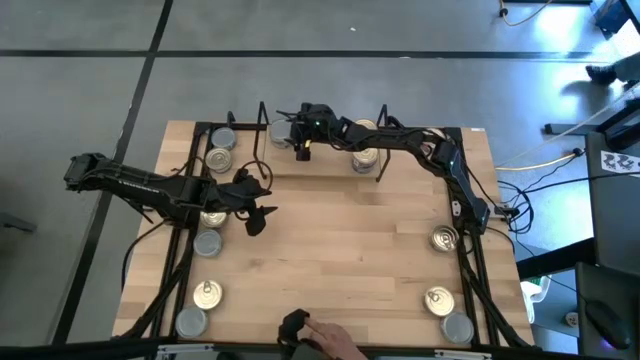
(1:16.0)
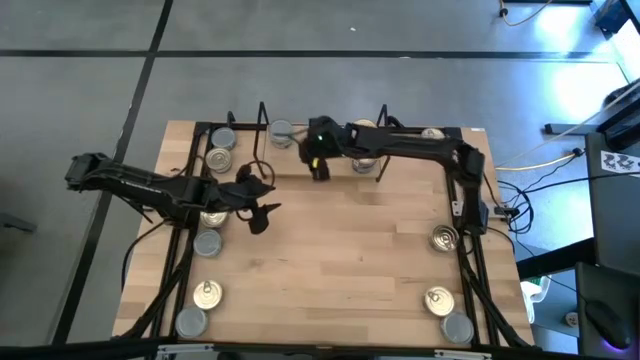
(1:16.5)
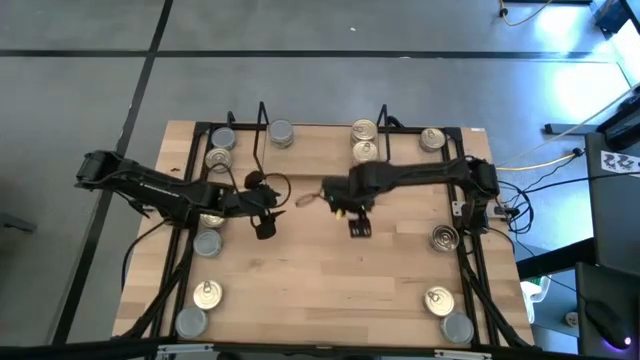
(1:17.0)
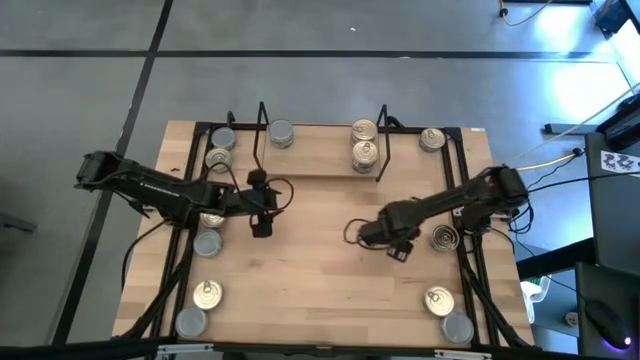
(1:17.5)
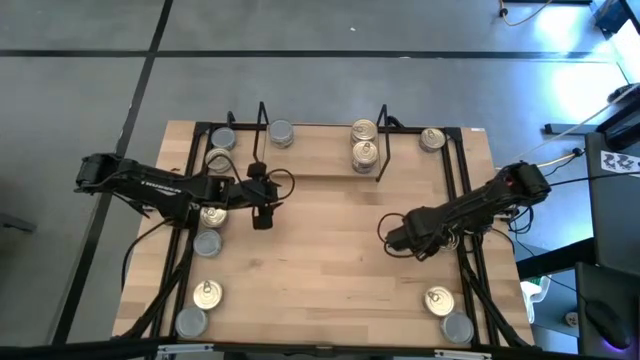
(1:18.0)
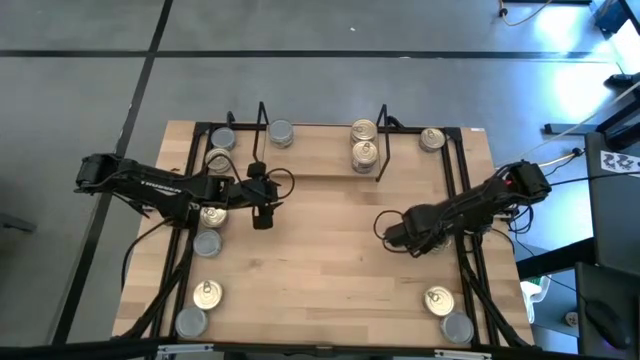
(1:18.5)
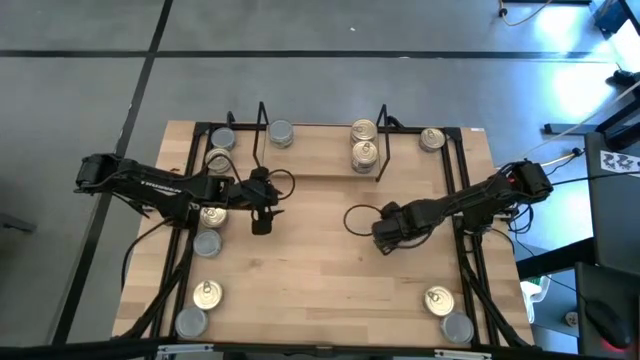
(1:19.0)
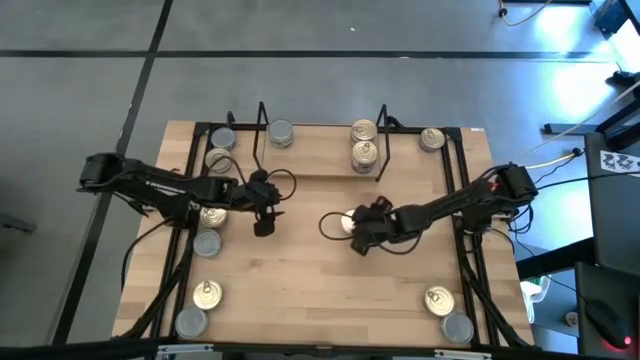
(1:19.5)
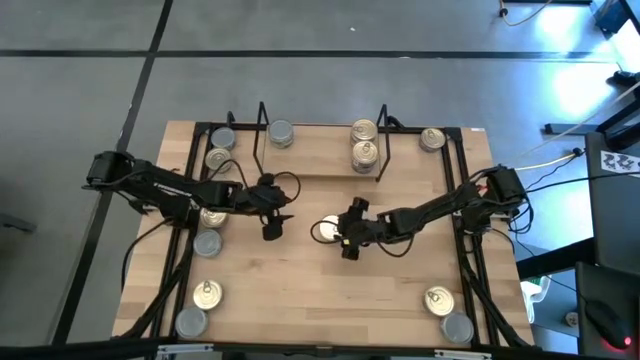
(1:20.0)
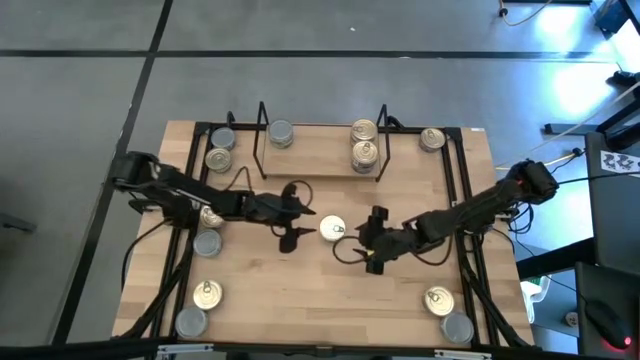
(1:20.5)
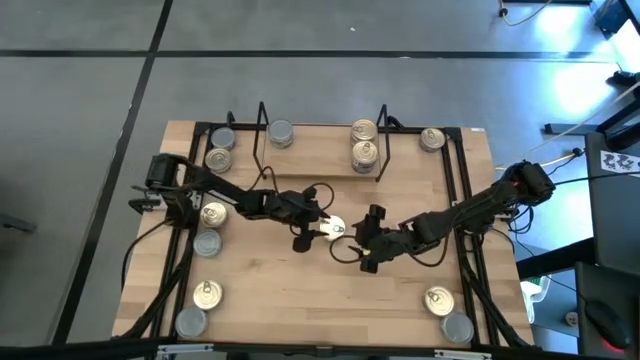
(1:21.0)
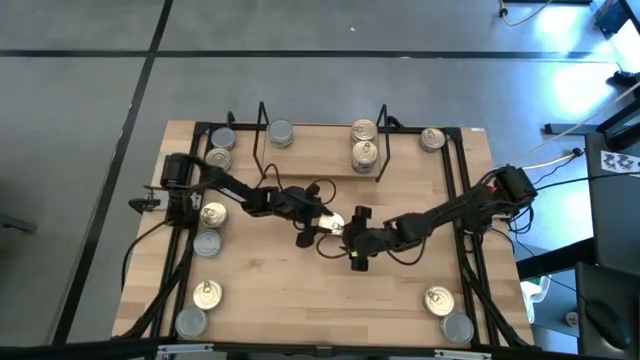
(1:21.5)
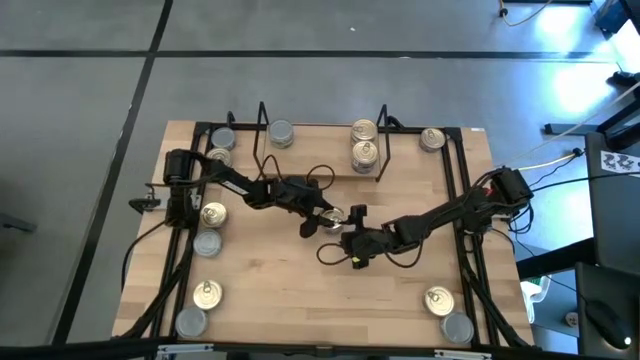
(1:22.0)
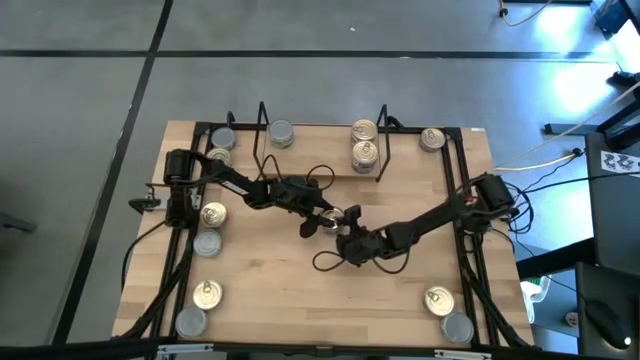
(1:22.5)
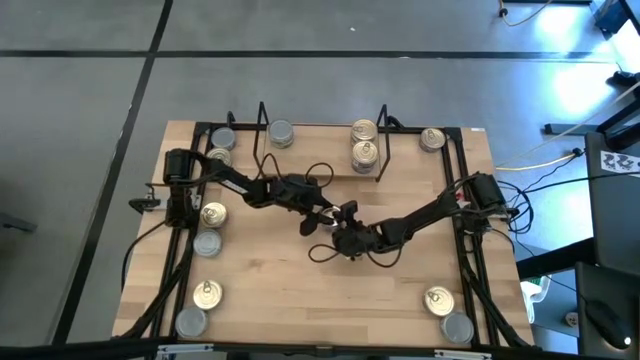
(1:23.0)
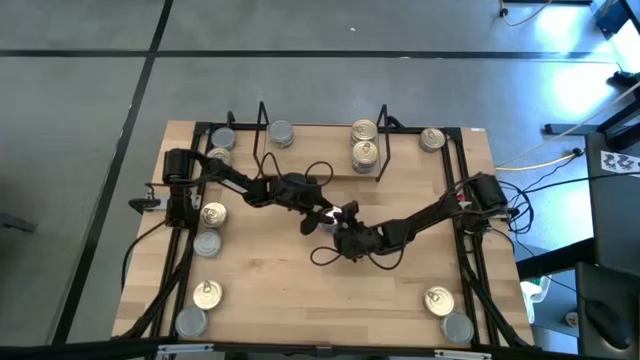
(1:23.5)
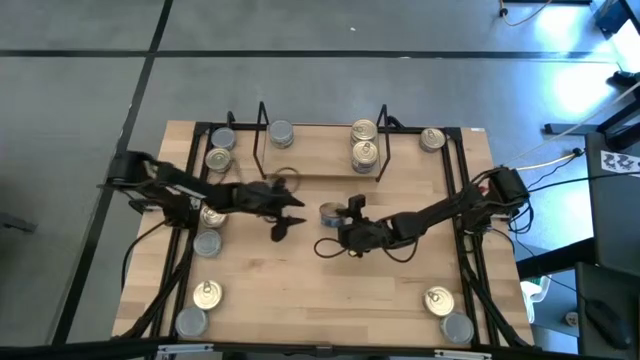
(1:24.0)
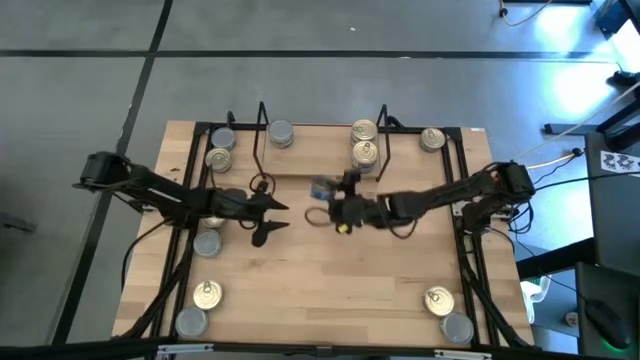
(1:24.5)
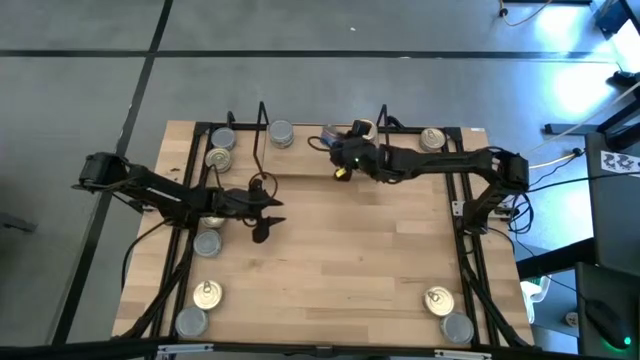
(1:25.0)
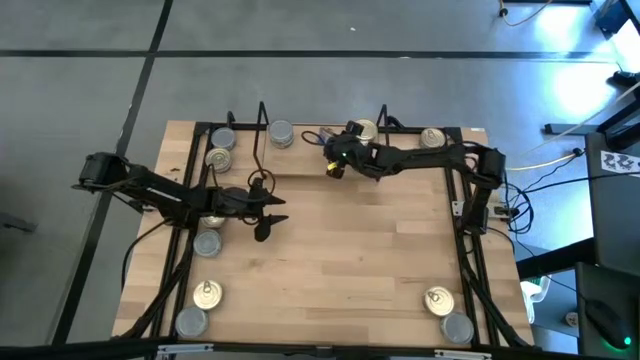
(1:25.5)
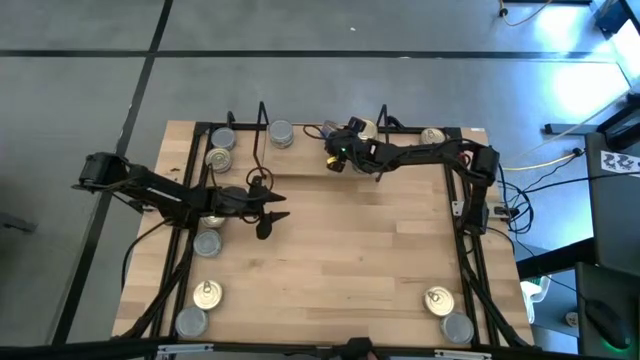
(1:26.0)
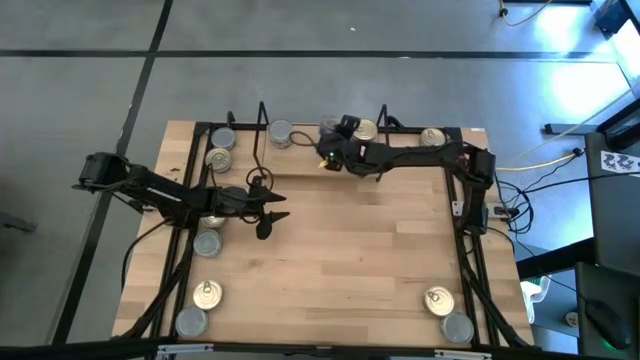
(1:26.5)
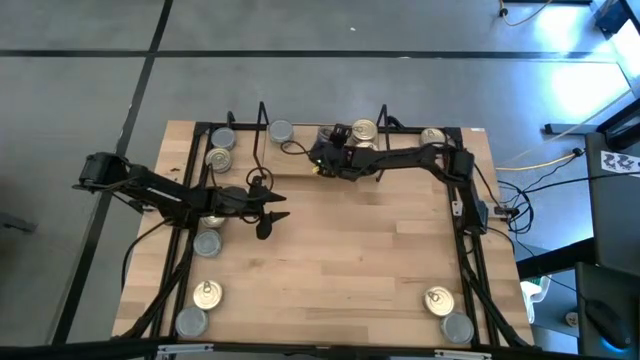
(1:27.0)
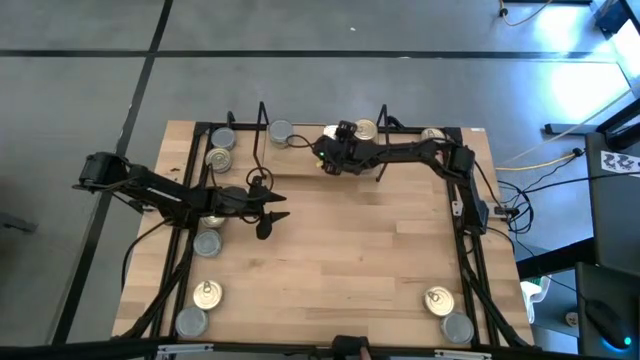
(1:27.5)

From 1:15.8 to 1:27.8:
Task: Stack canned seafood by type on shelf
Put the blue-pink tuna can on the shelf

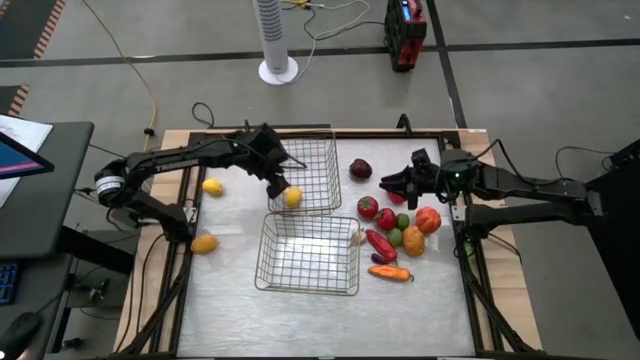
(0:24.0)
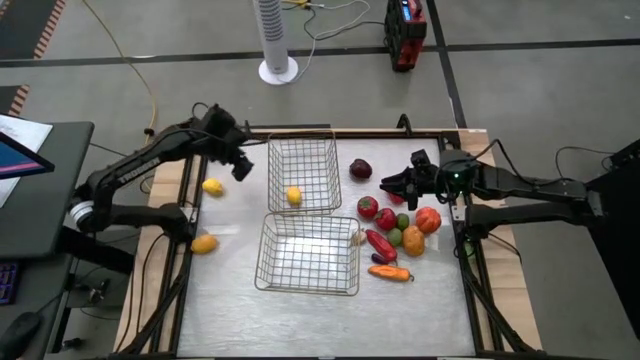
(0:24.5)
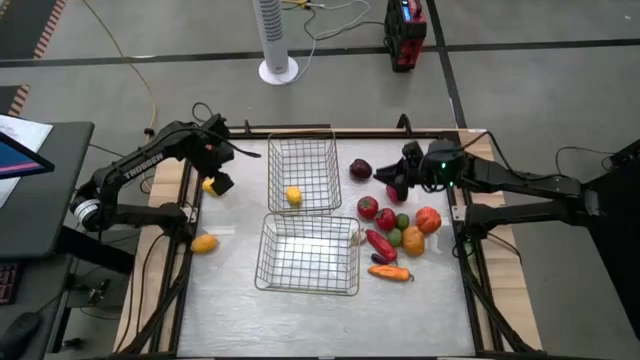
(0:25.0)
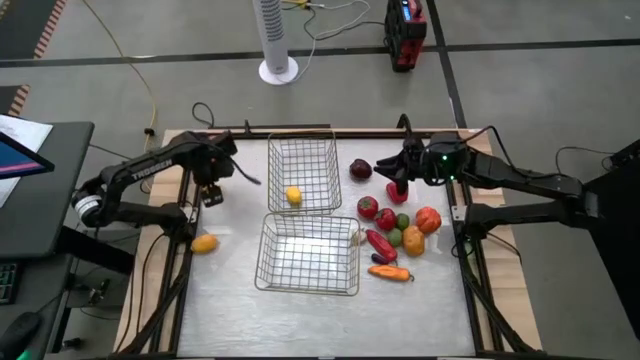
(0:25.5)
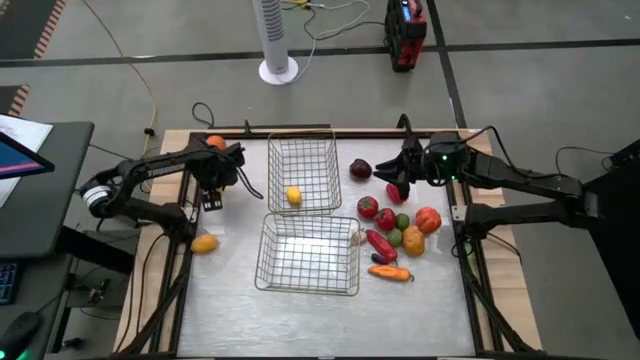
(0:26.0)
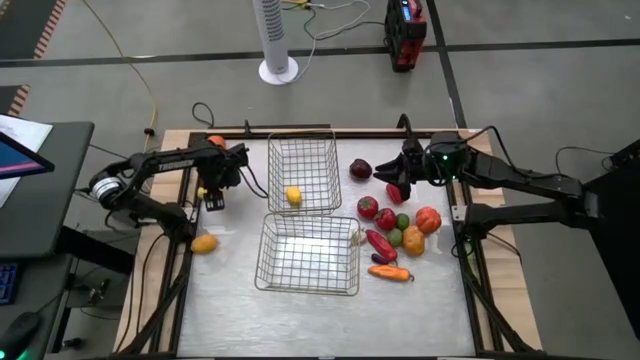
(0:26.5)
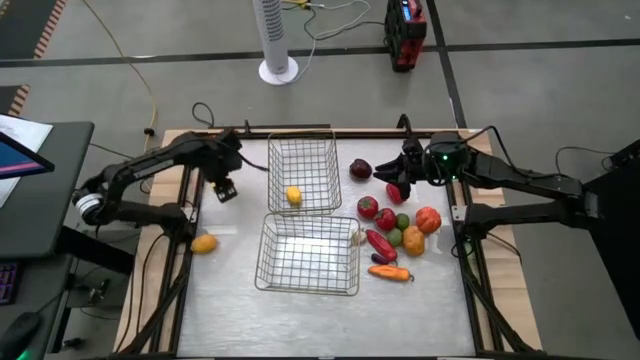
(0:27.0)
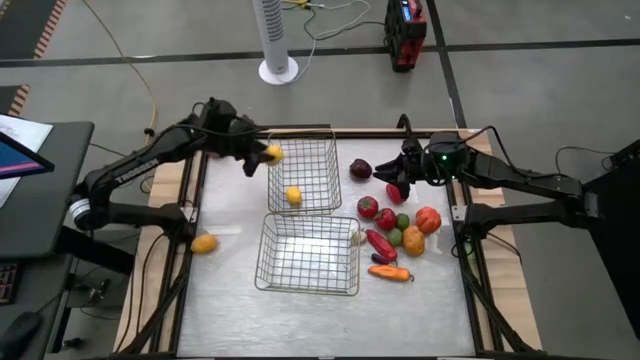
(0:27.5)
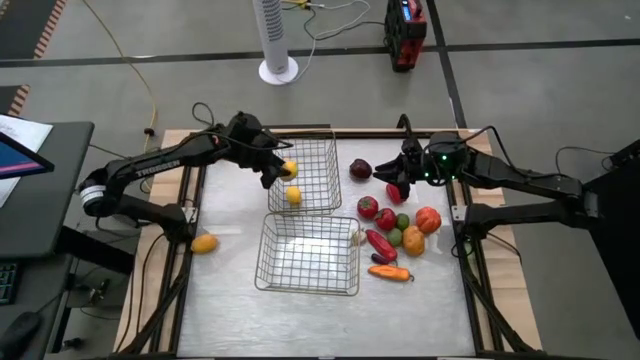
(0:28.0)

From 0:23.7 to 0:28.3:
Task: Sort produce into baskets
Put the top yellow lemon into the top wire basket

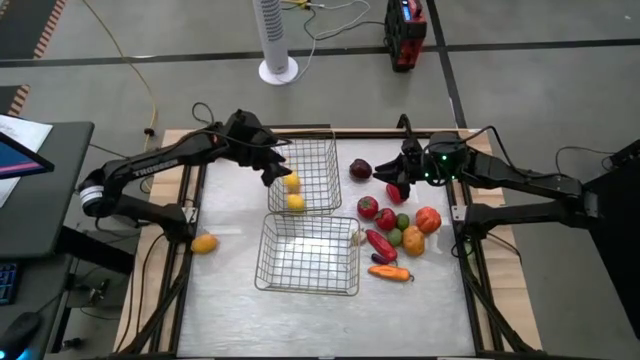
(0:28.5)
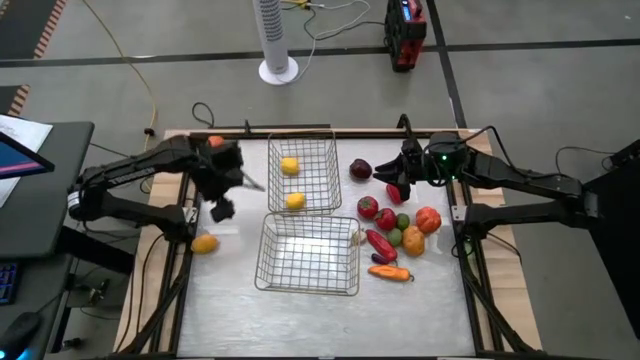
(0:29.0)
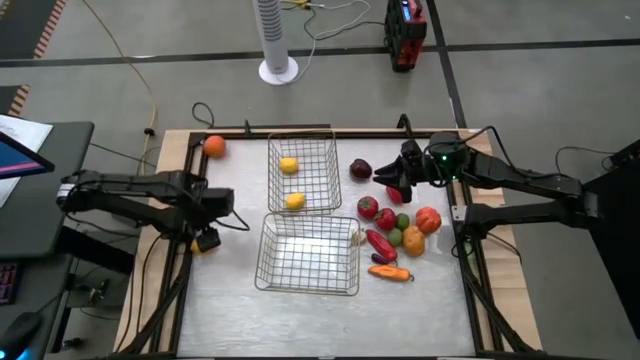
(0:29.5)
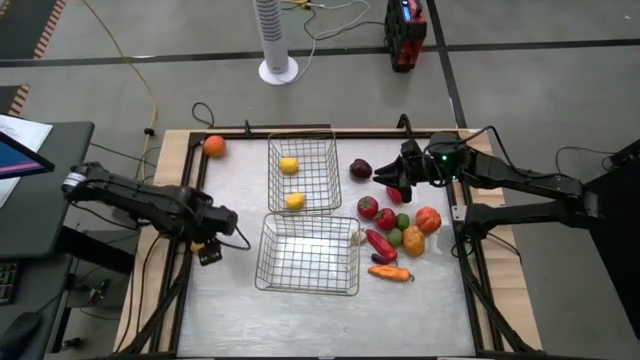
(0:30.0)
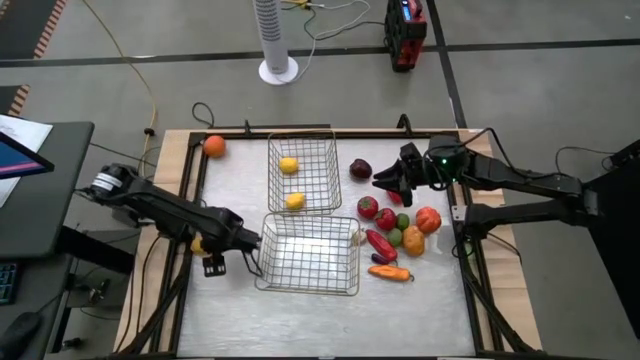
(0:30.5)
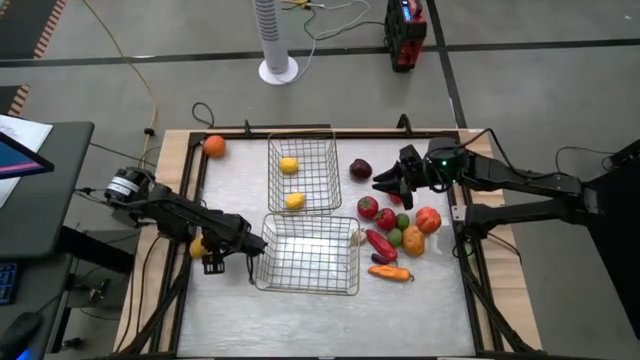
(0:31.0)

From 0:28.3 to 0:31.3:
Put the yellow lemon into the top wire basket

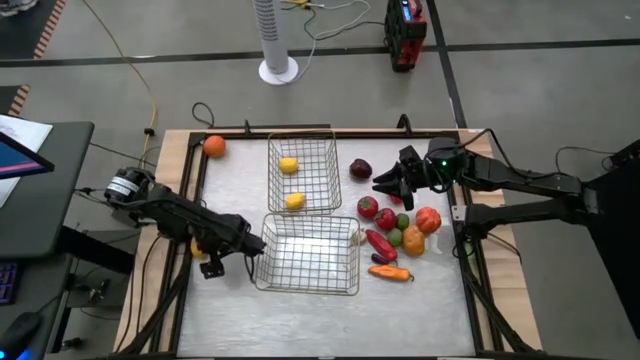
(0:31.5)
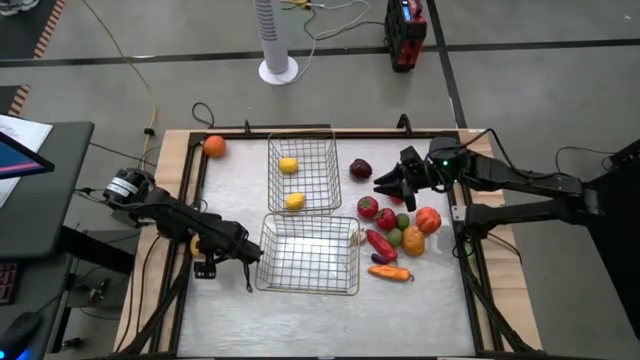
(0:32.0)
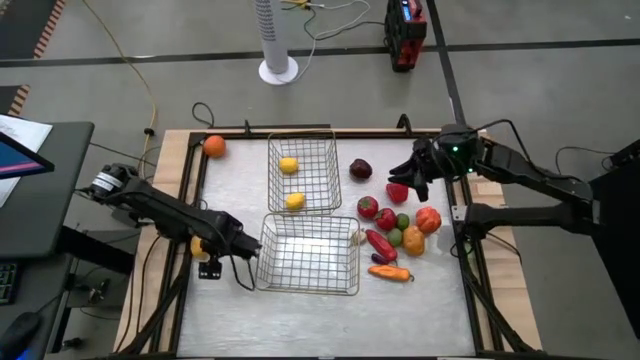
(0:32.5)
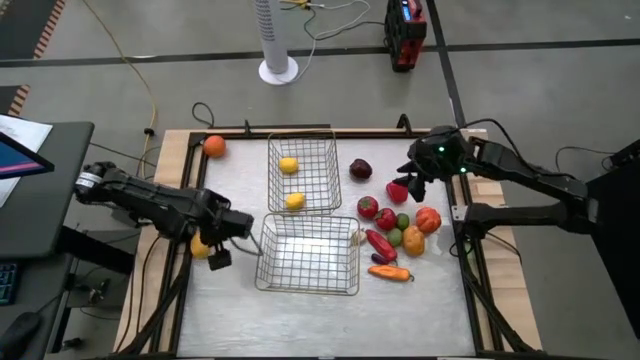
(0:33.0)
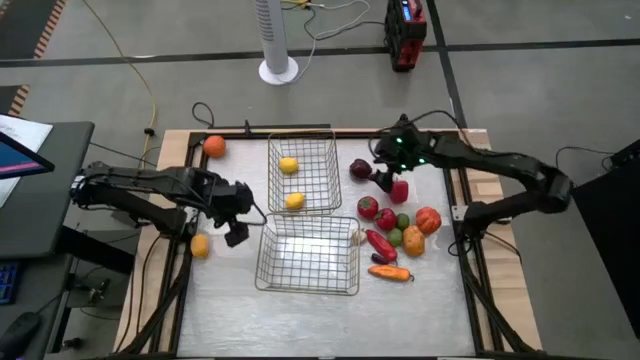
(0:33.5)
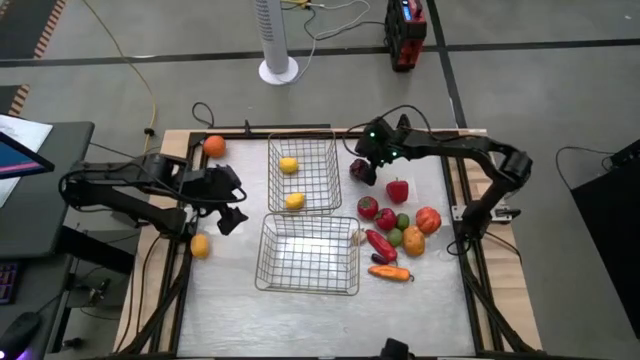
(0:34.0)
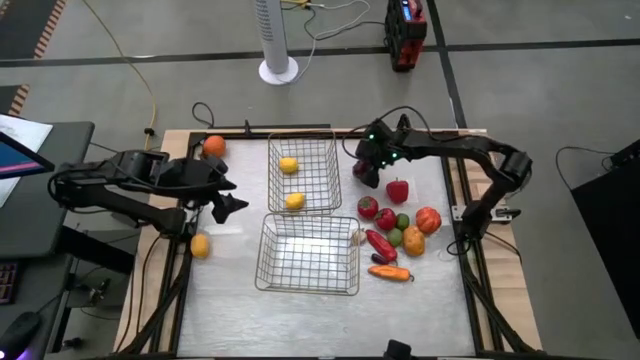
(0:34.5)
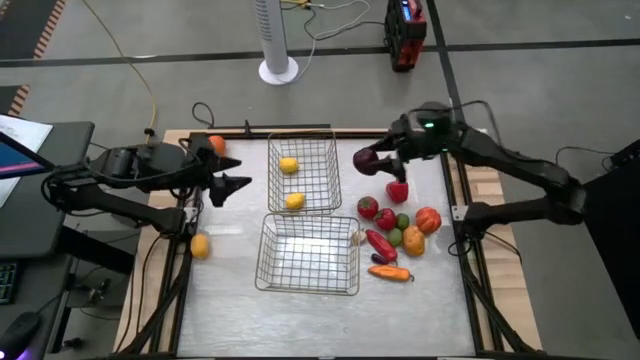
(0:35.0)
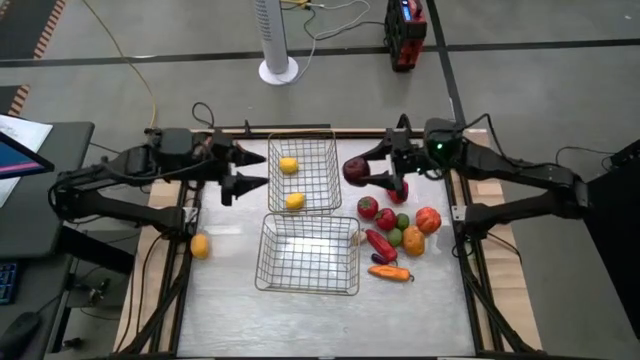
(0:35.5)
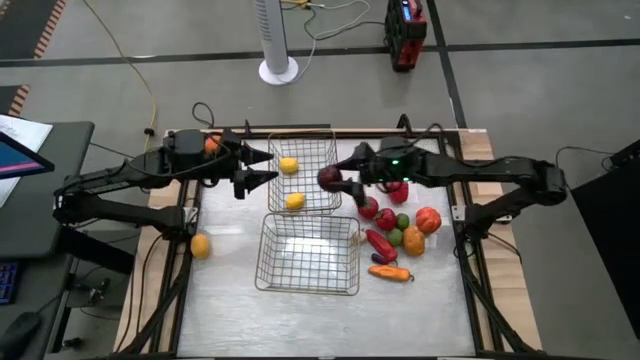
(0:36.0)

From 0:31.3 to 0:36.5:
Put the red apple into the top wire basket
